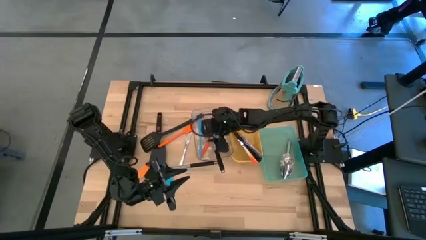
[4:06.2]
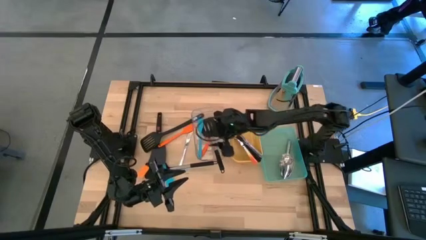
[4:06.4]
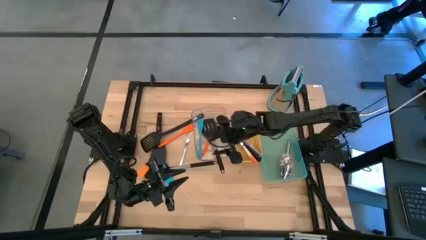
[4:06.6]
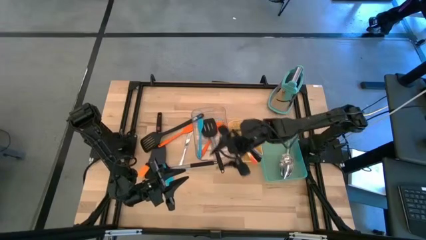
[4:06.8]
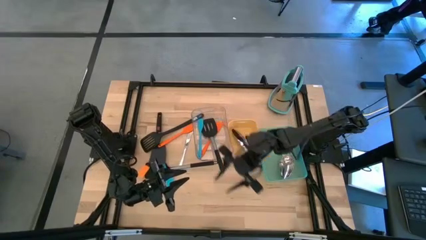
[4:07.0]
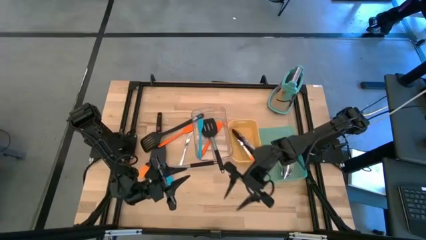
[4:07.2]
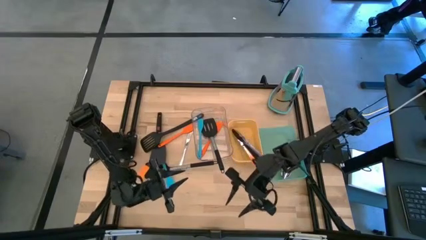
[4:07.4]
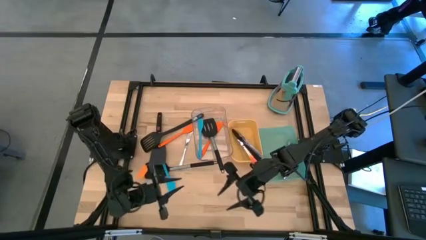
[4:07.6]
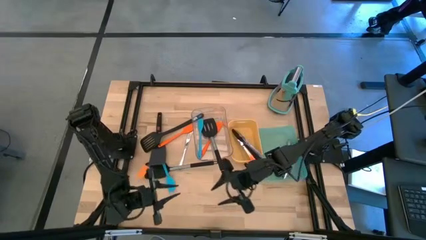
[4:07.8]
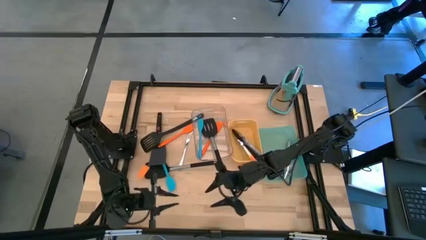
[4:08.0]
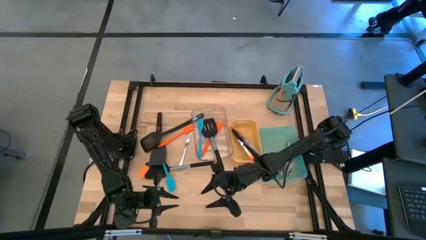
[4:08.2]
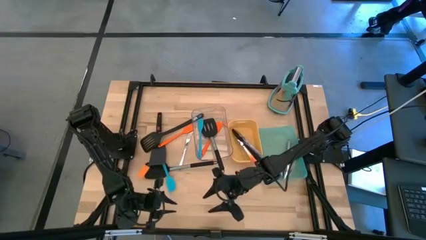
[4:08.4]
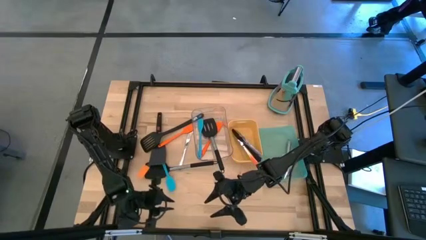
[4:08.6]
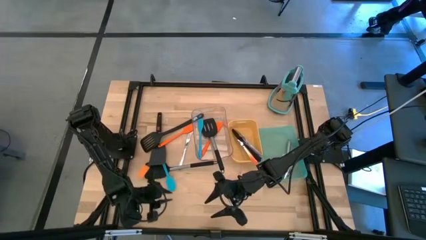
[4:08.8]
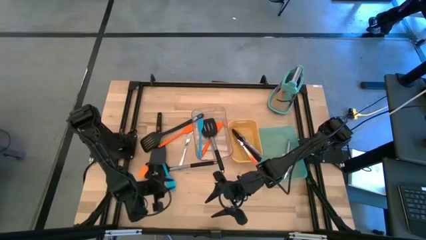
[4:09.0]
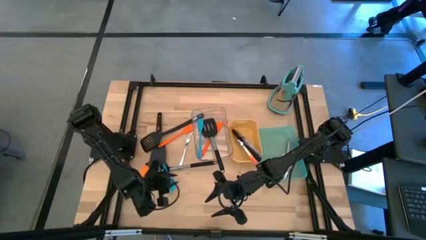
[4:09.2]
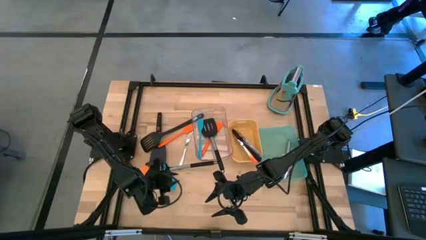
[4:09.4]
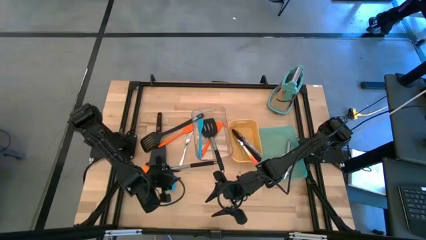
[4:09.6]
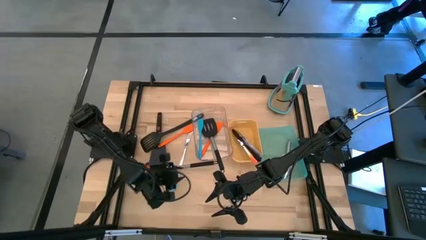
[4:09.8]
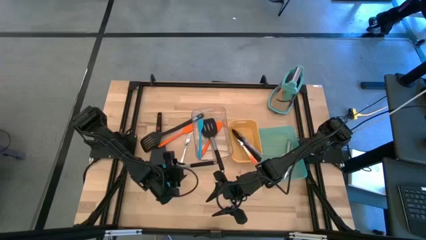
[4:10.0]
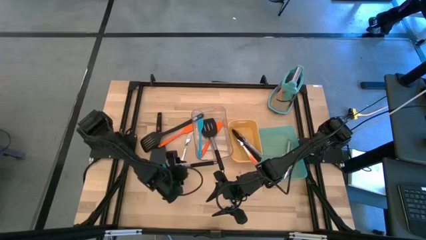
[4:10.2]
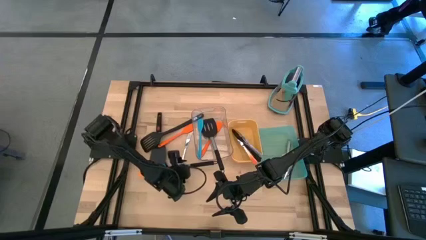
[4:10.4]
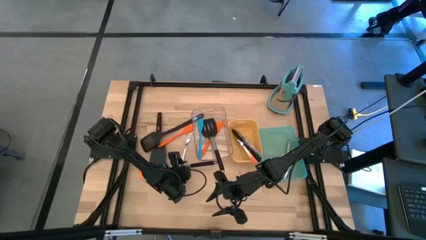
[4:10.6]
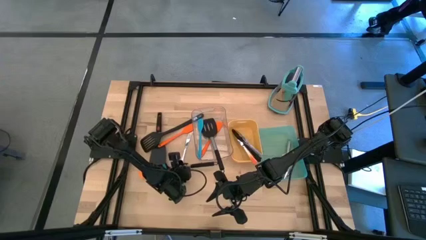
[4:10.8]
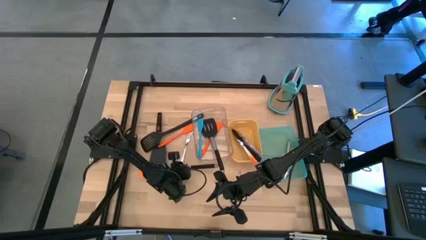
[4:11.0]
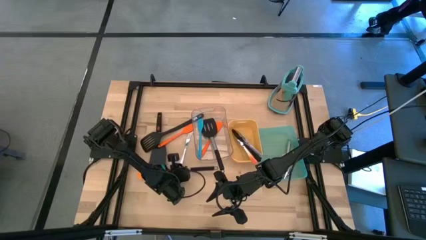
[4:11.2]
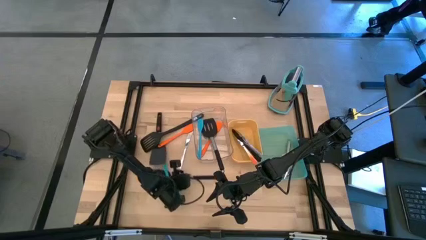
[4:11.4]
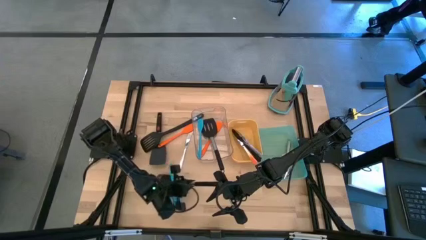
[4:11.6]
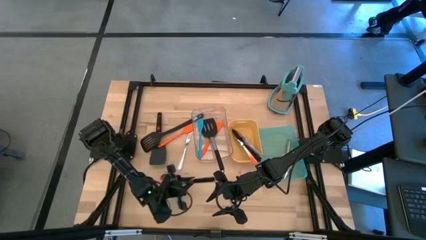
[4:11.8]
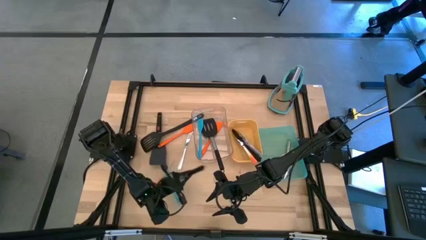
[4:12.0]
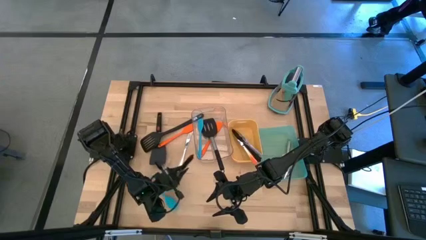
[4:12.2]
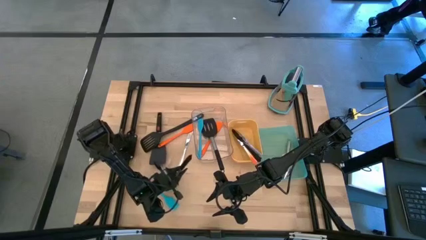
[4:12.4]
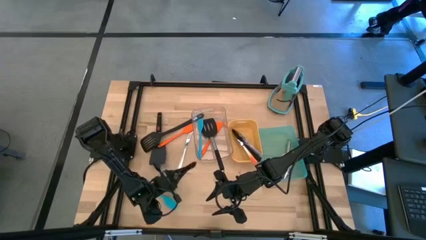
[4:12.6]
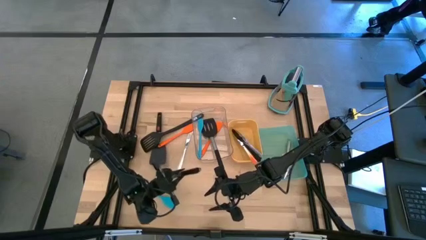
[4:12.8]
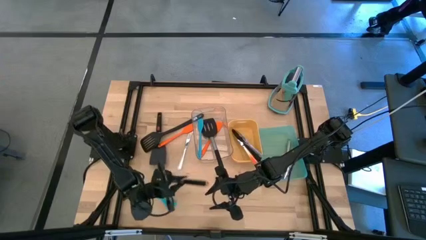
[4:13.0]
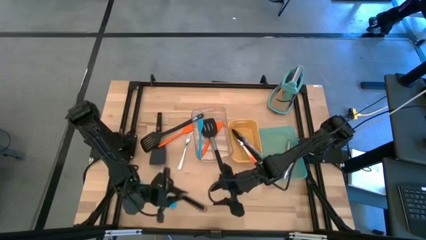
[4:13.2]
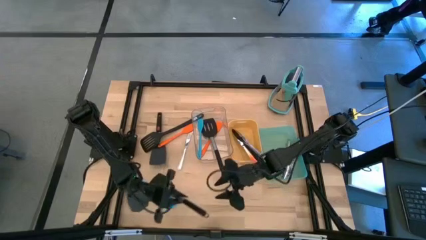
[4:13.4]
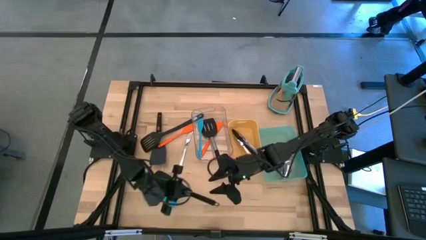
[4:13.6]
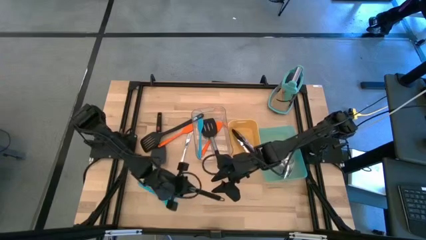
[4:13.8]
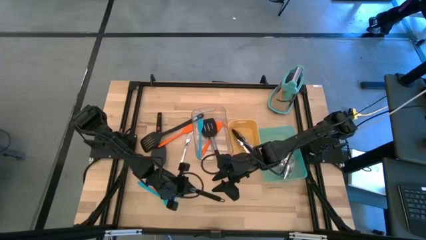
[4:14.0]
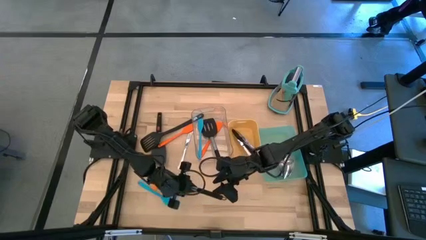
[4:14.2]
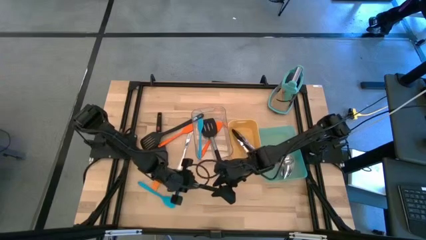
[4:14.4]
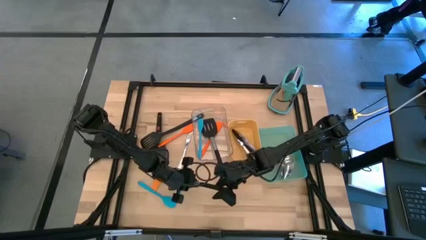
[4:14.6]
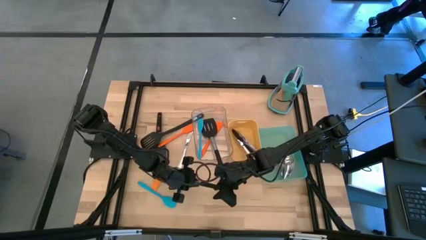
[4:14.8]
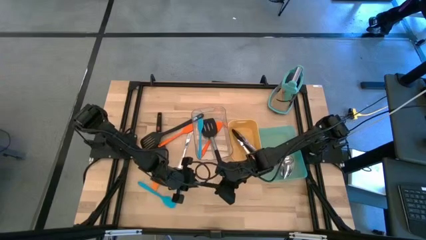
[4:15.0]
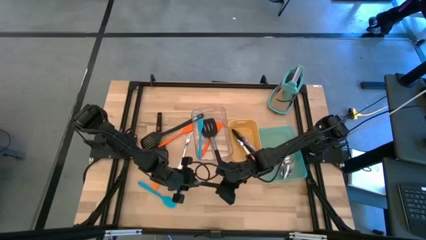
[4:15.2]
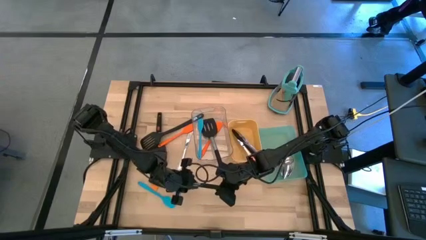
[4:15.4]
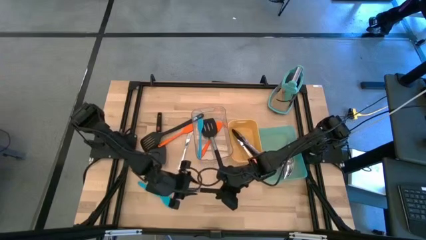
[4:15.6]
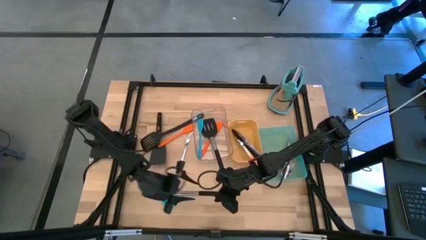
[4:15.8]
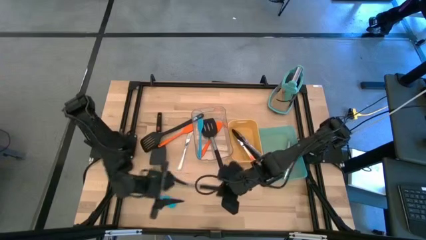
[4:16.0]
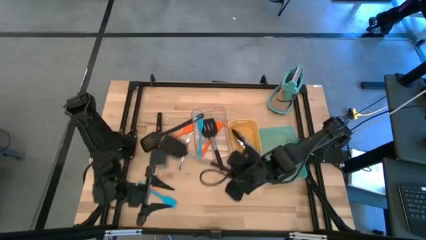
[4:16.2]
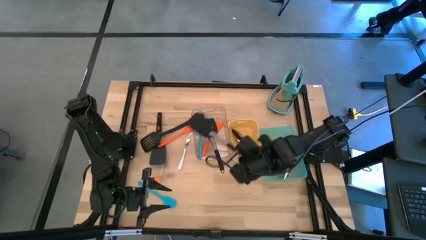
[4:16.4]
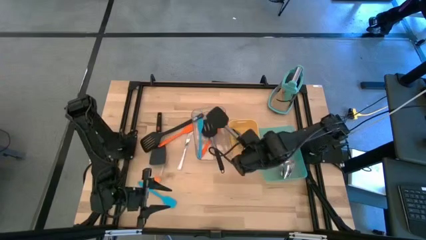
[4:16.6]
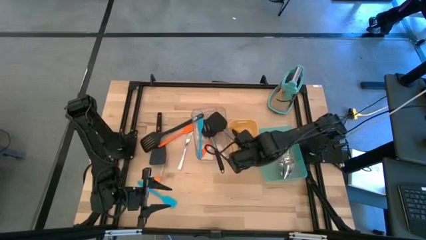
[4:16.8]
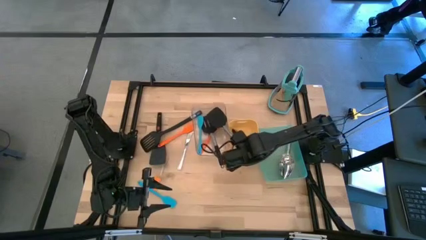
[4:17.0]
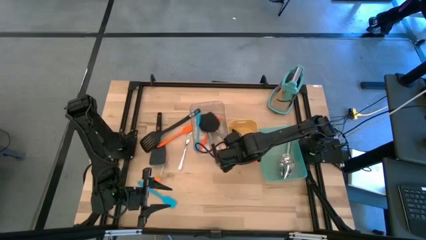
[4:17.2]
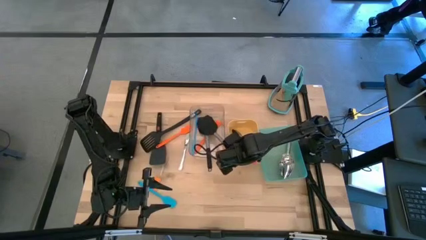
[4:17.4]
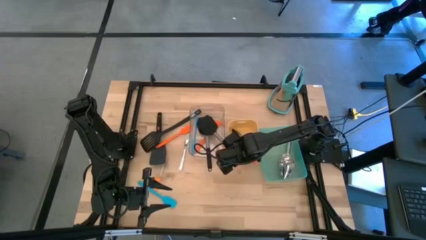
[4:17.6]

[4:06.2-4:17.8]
Task: Pick & Place Kitchen Items
Put the black spatula into the transparent bin
